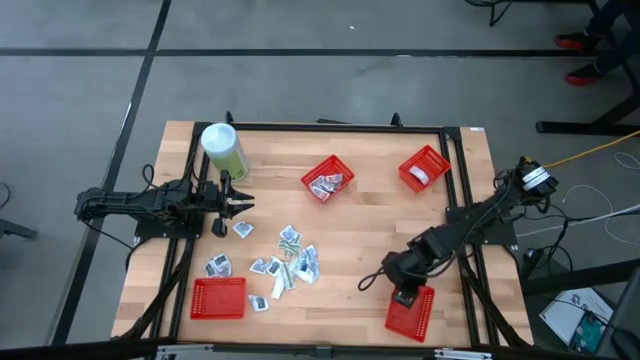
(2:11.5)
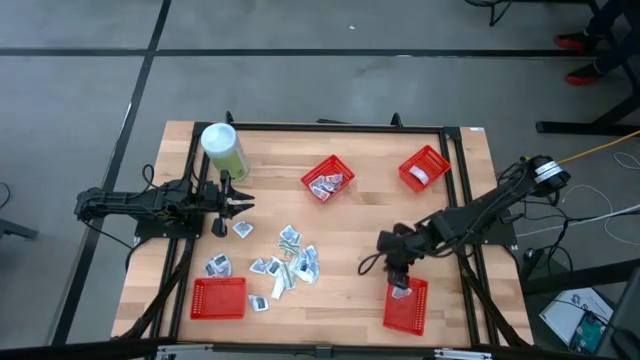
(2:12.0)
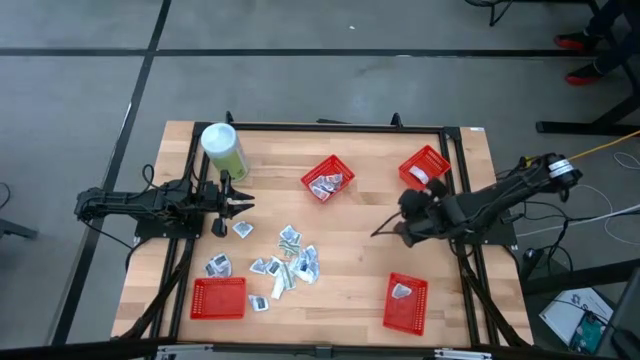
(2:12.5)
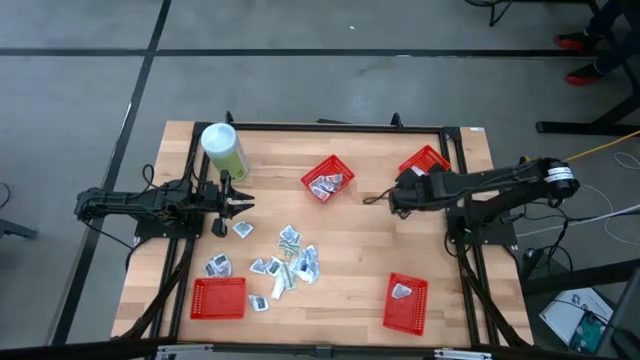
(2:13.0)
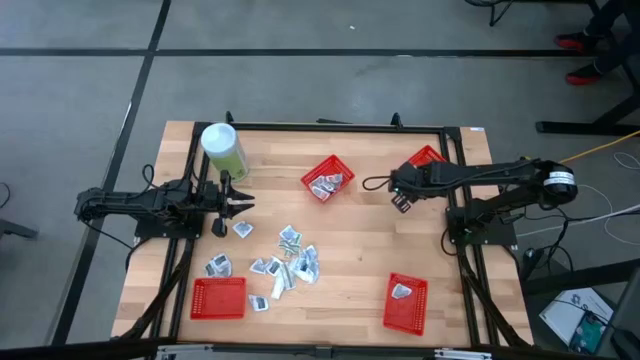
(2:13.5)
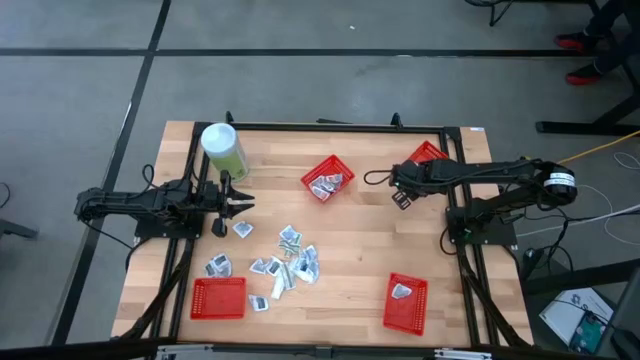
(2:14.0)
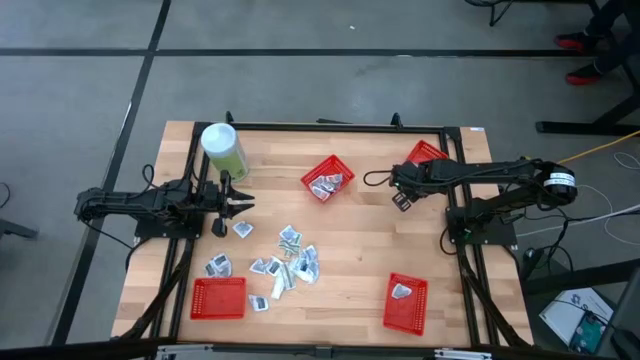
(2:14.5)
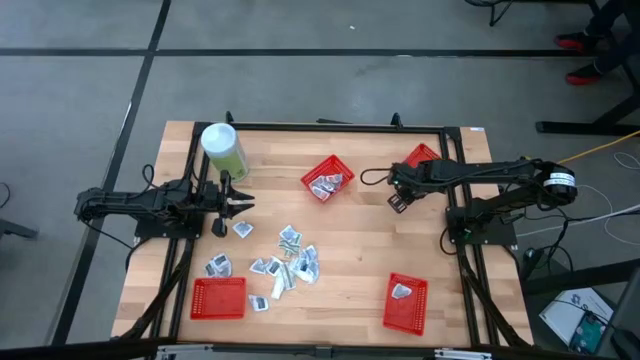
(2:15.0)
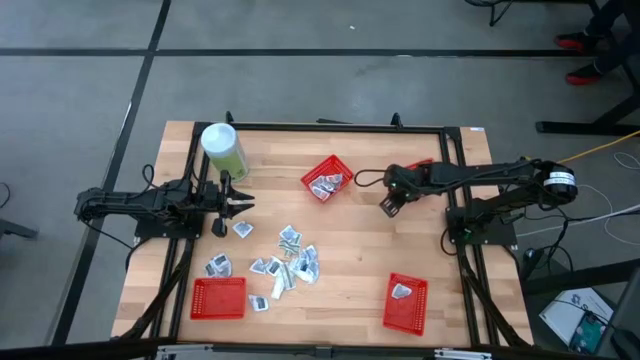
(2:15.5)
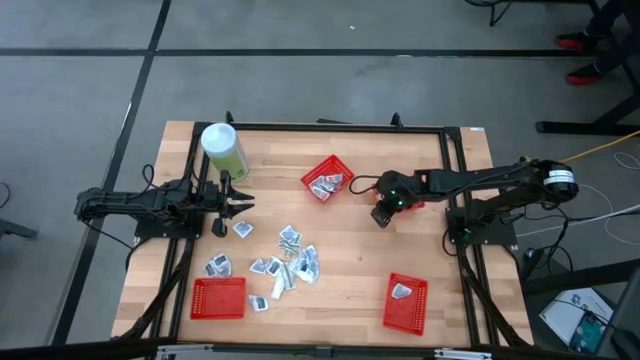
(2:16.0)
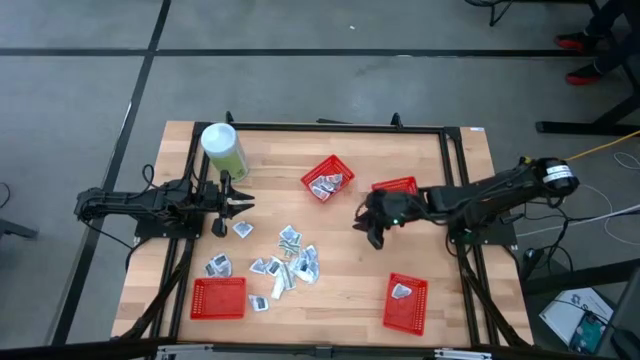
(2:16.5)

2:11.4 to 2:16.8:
Task: Pick & Place First Aid Supplies
Adjust the red container

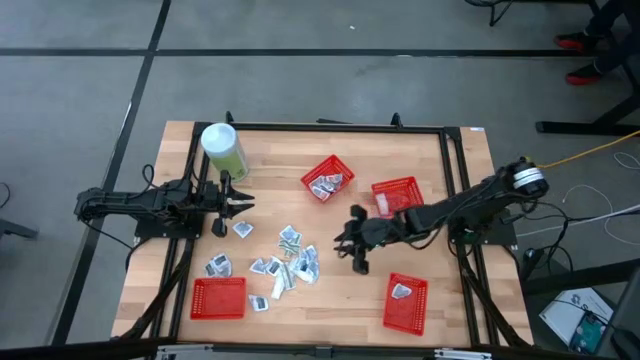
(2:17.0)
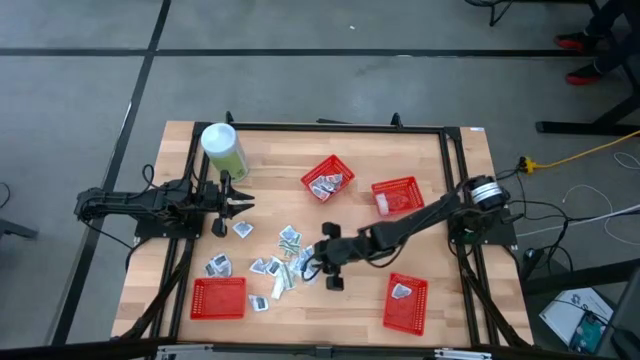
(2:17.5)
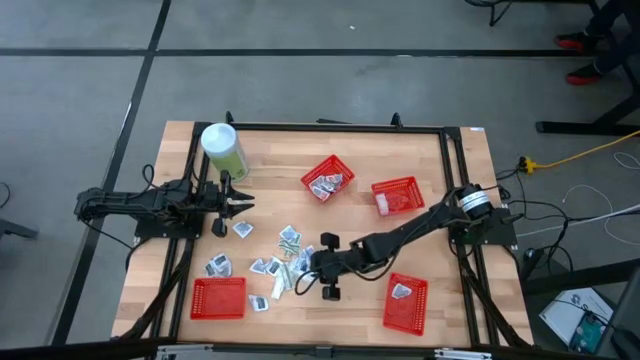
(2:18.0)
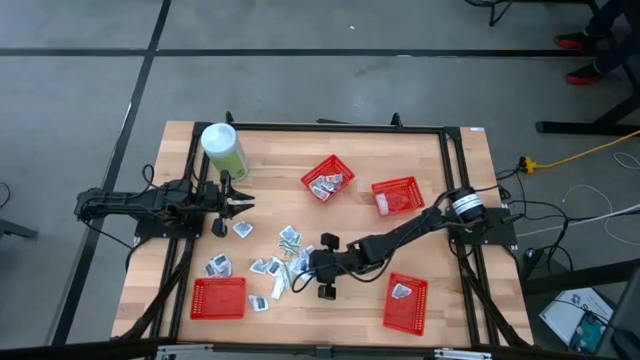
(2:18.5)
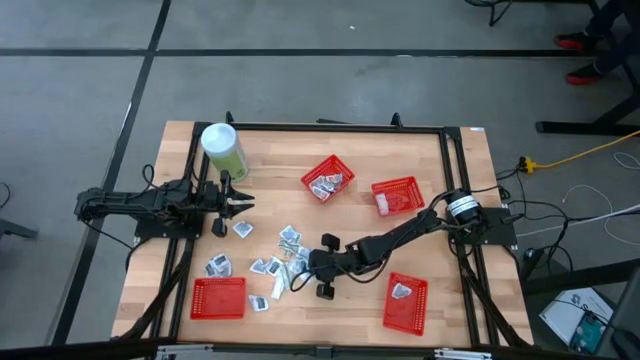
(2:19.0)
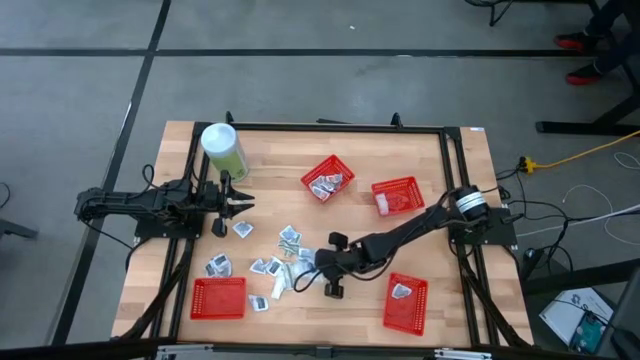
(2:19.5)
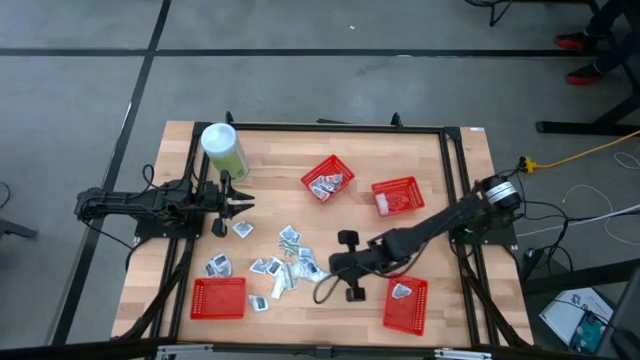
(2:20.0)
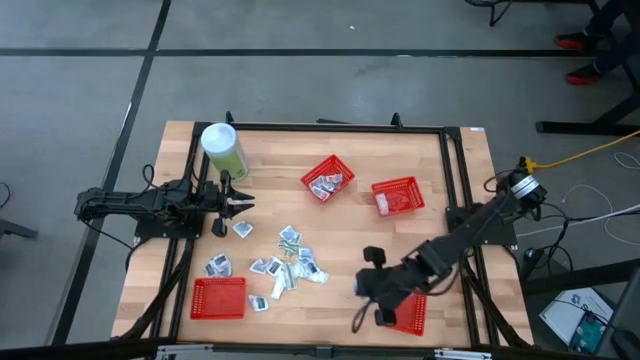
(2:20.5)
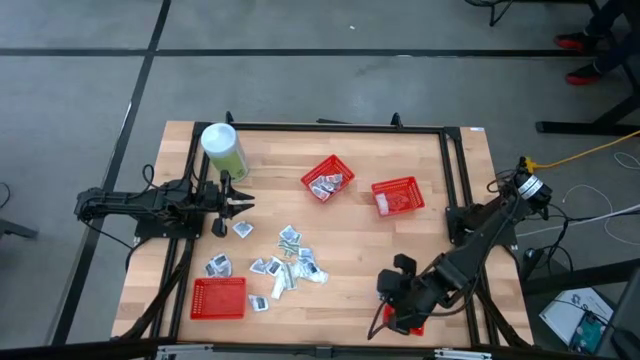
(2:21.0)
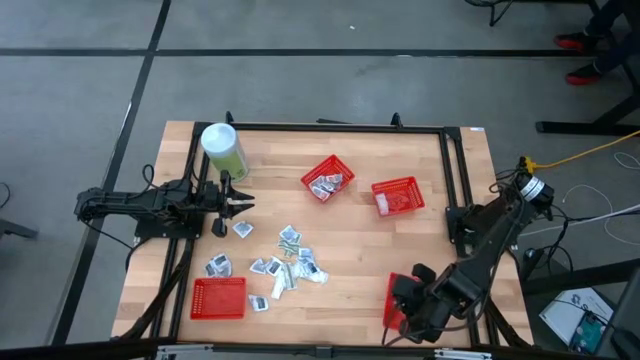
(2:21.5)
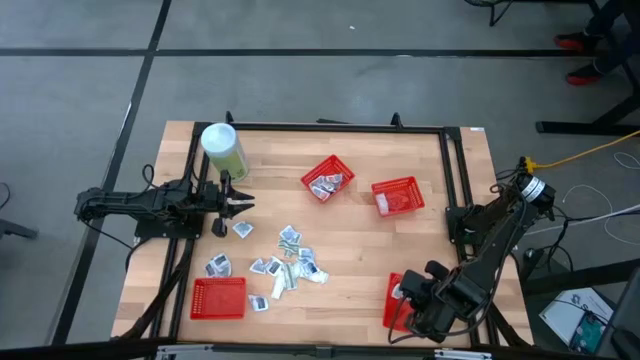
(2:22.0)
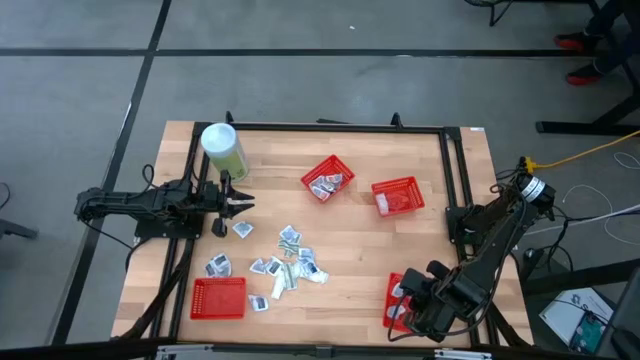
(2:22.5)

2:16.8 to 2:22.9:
Put the blue alcohol pad into the red container

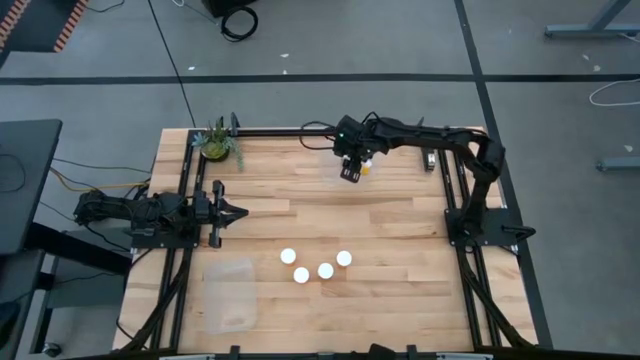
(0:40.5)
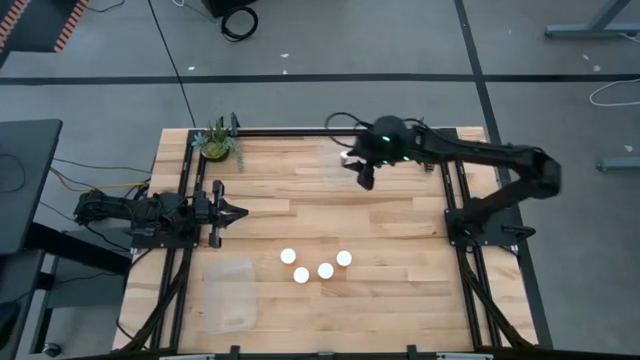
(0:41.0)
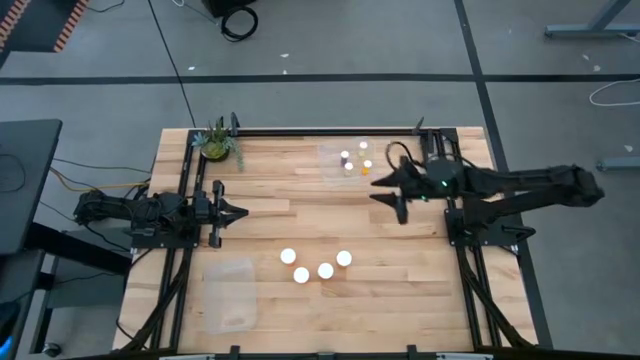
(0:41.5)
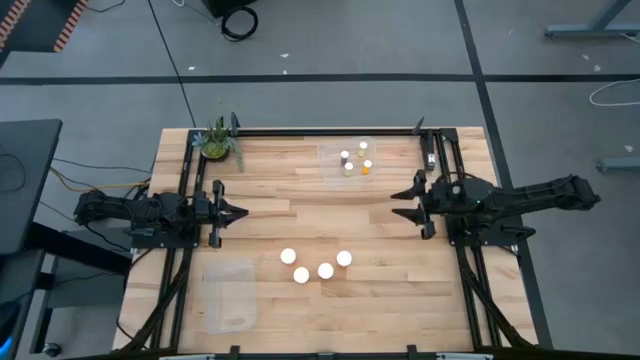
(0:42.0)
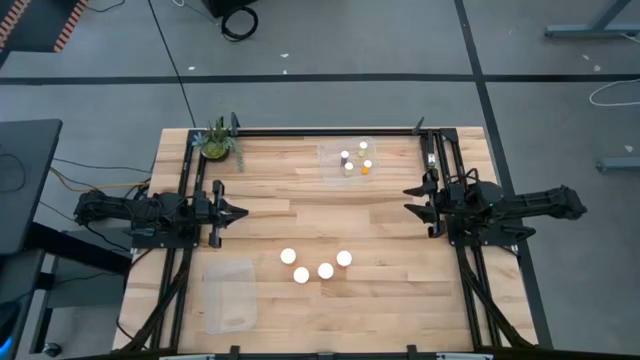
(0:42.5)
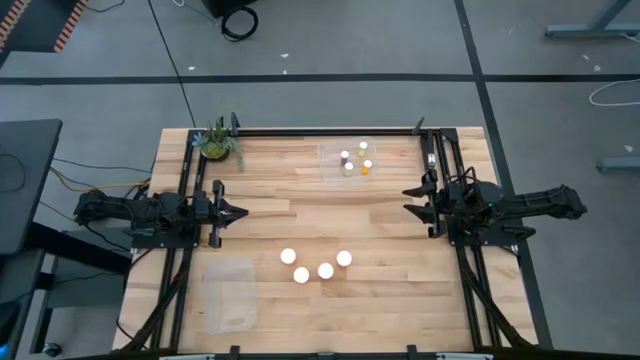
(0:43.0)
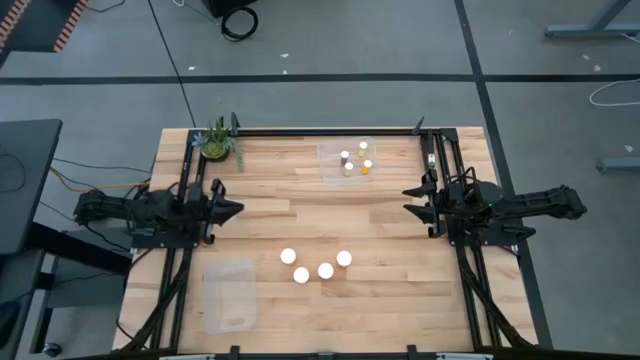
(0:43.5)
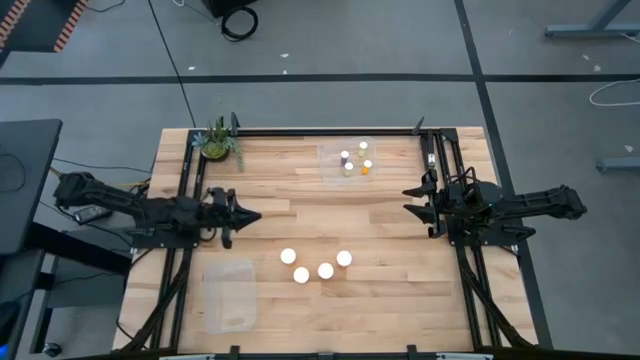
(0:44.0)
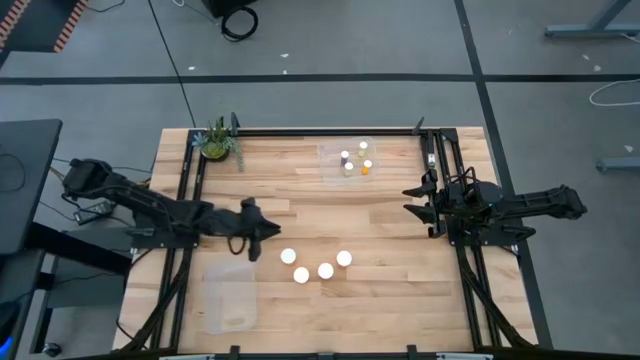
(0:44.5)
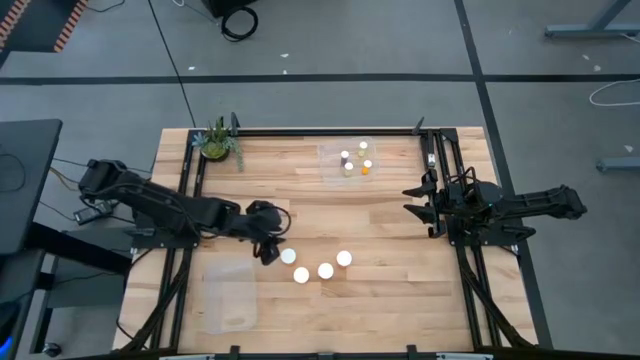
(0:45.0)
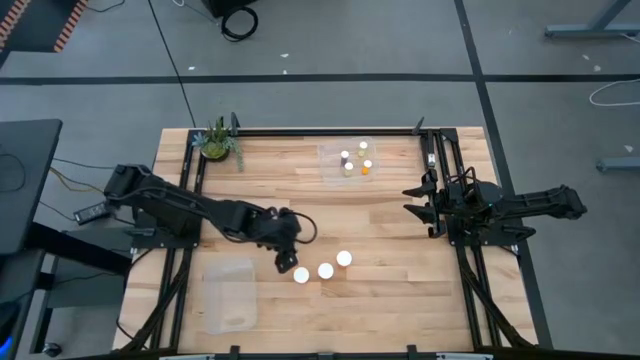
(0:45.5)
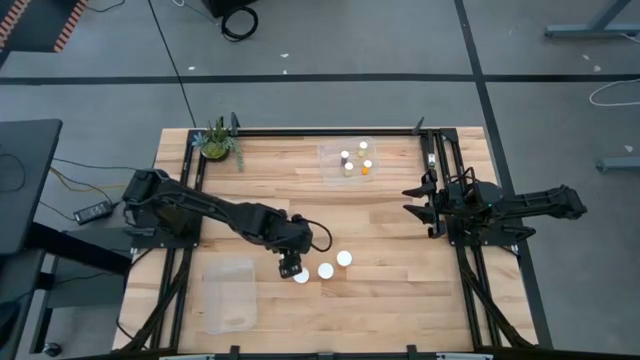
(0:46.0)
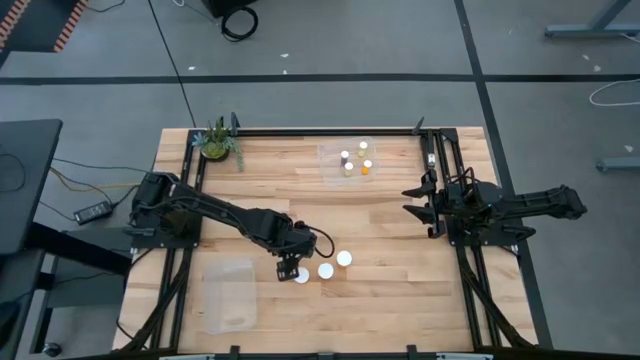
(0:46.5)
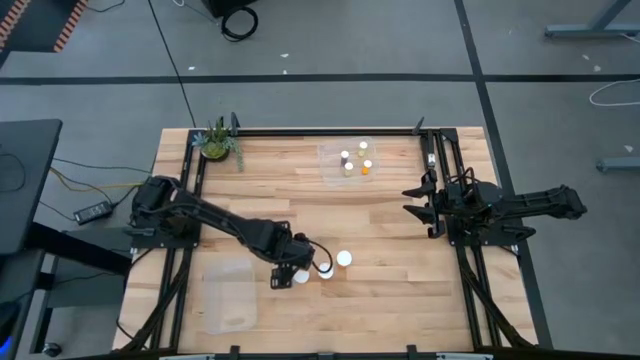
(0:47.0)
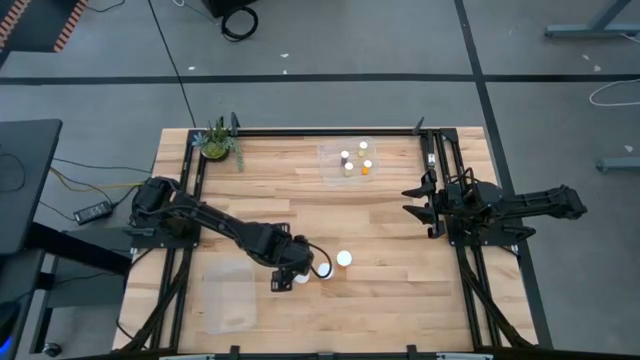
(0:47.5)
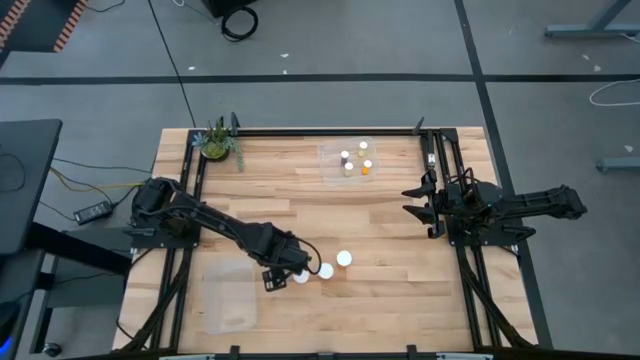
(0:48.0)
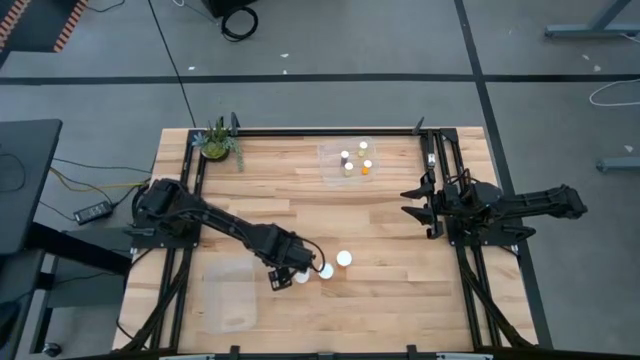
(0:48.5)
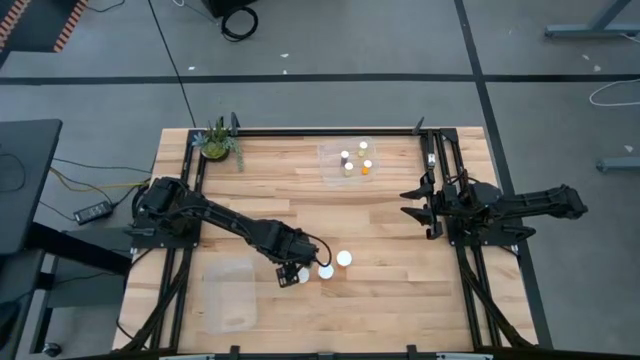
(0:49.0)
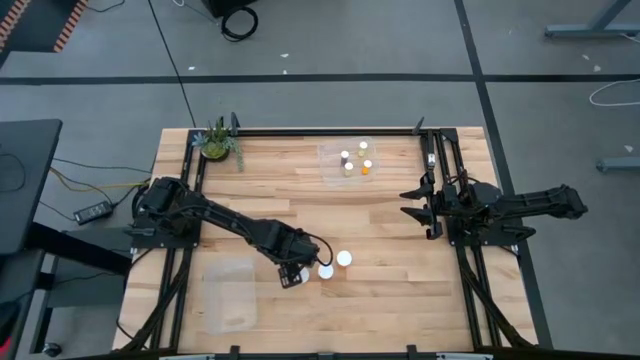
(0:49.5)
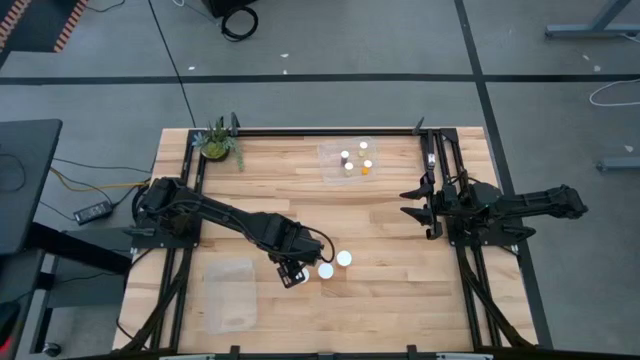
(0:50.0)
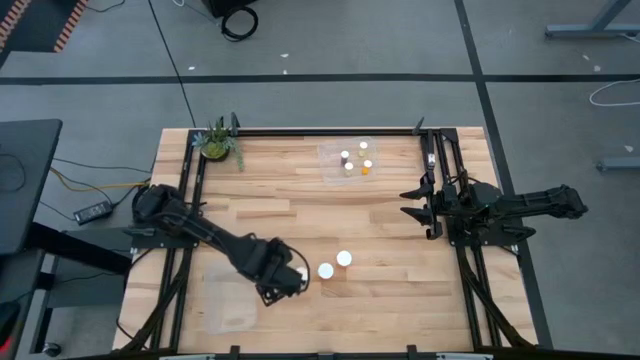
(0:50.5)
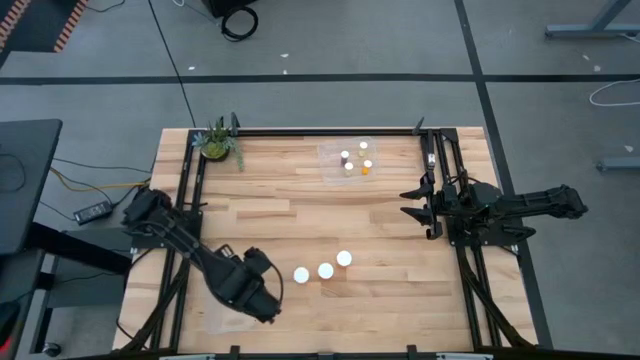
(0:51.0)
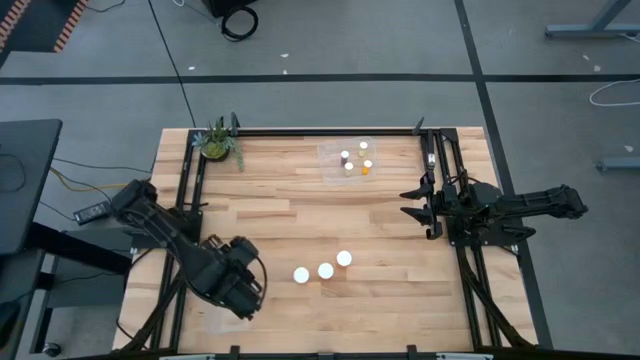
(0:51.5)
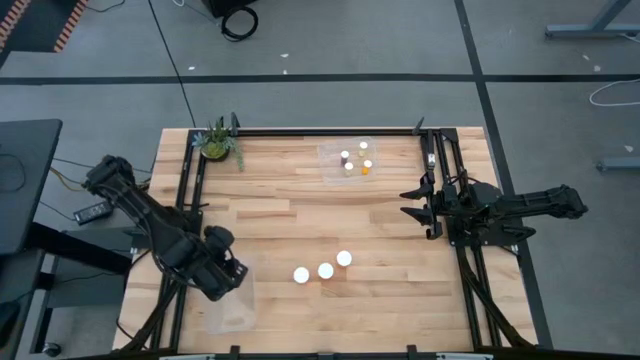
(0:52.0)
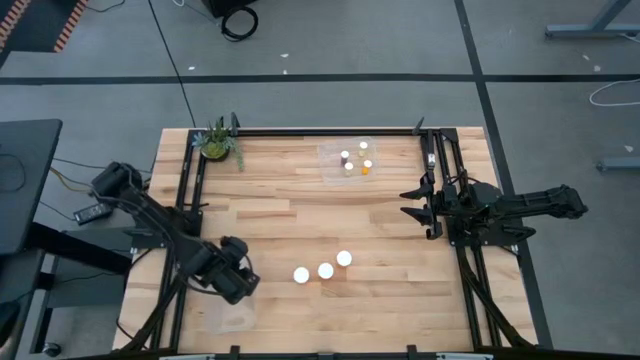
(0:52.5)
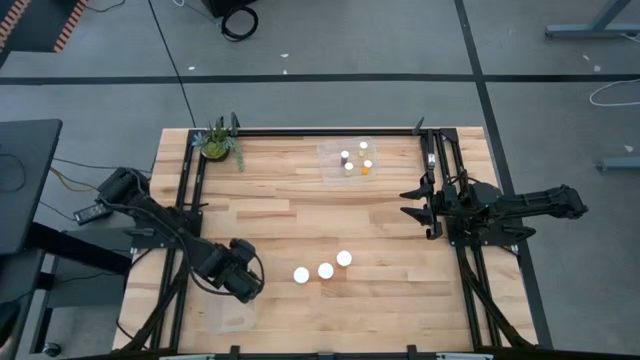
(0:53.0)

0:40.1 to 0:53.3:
Task: Pick and place medicine bottles into bin by pill shape (circle, oval)
Put the big orange pill bottle into the bottom transparent bin
